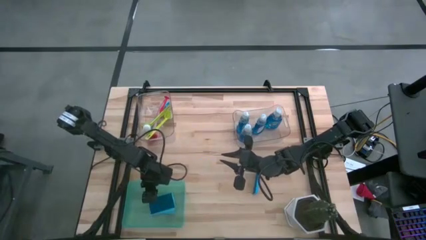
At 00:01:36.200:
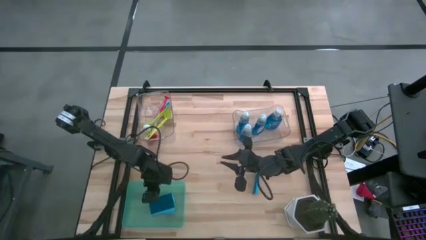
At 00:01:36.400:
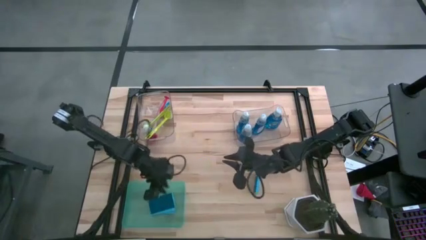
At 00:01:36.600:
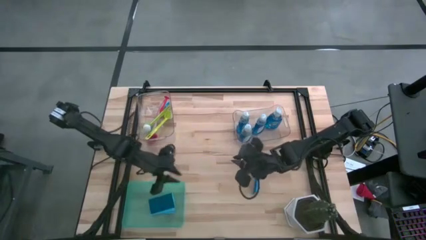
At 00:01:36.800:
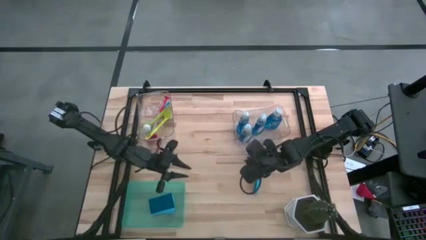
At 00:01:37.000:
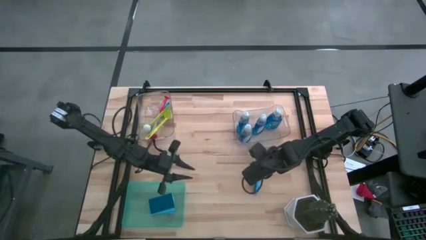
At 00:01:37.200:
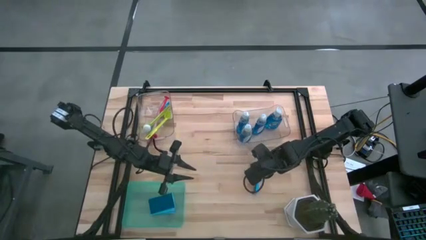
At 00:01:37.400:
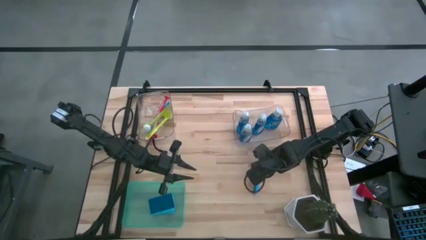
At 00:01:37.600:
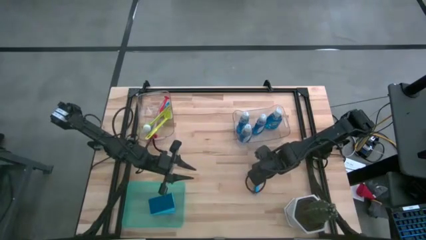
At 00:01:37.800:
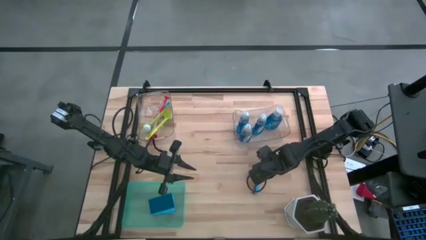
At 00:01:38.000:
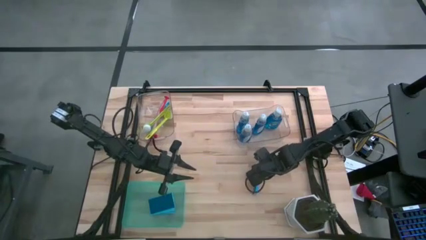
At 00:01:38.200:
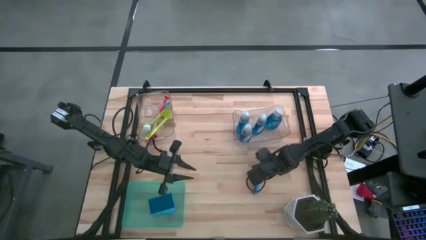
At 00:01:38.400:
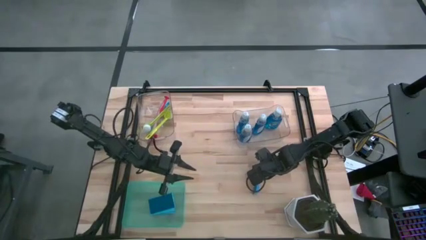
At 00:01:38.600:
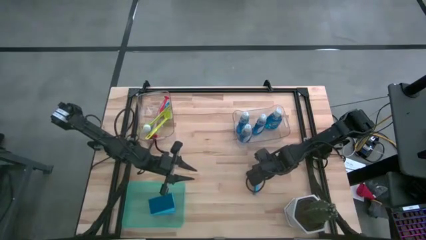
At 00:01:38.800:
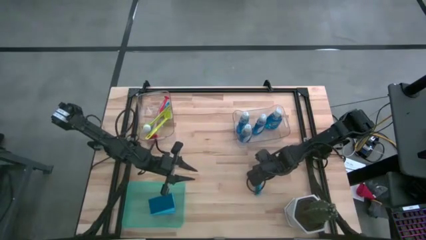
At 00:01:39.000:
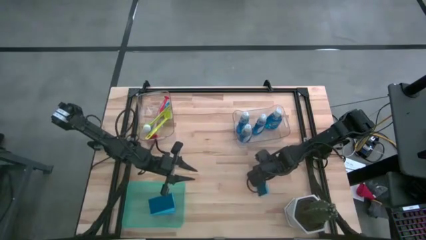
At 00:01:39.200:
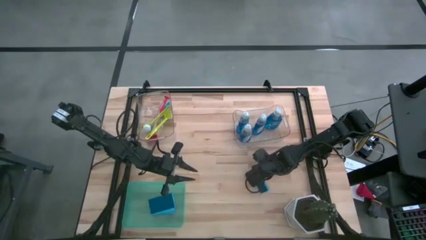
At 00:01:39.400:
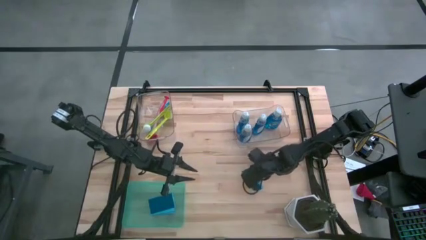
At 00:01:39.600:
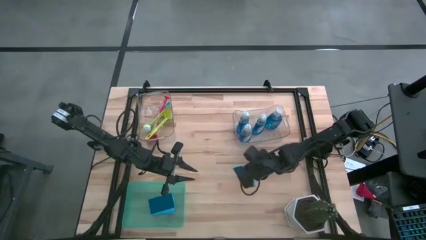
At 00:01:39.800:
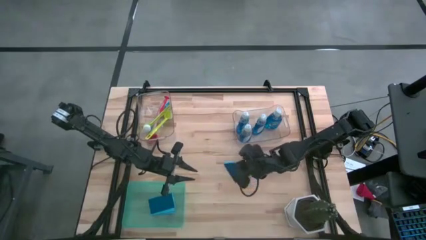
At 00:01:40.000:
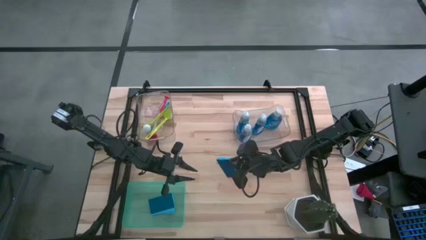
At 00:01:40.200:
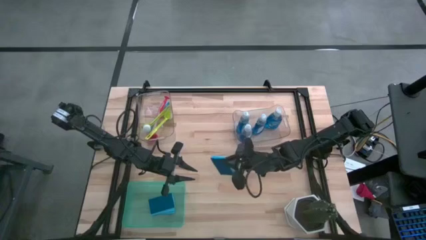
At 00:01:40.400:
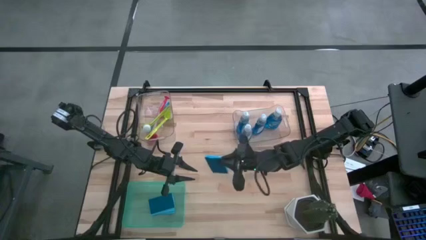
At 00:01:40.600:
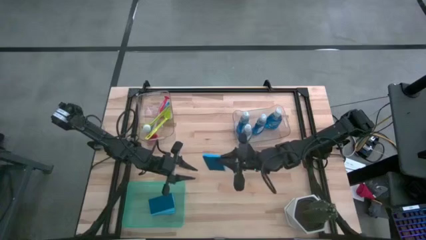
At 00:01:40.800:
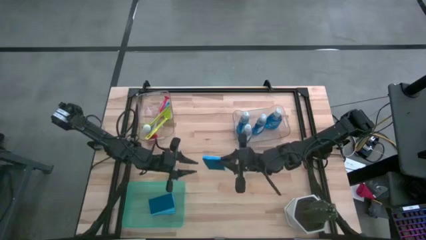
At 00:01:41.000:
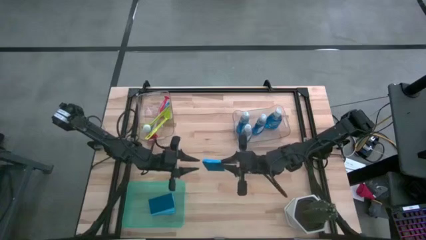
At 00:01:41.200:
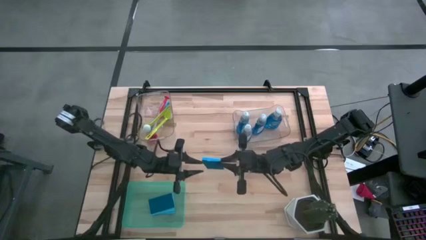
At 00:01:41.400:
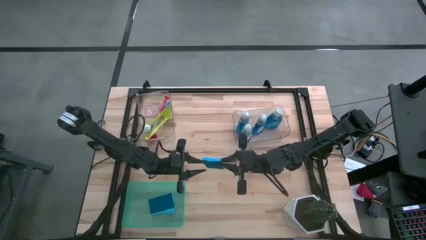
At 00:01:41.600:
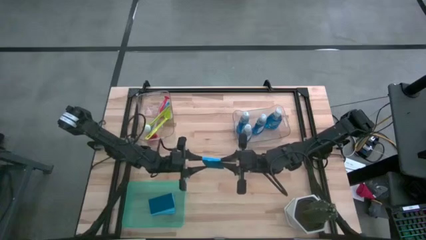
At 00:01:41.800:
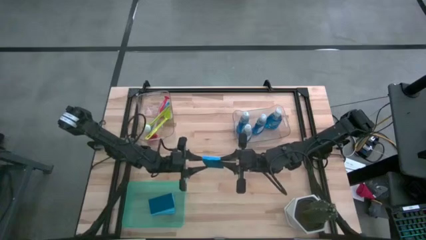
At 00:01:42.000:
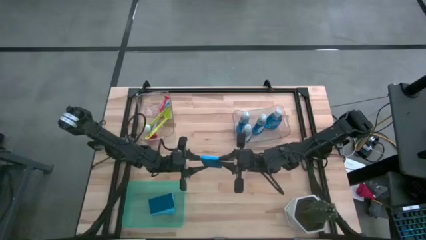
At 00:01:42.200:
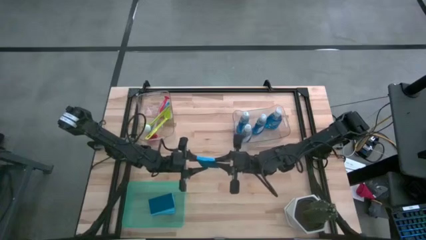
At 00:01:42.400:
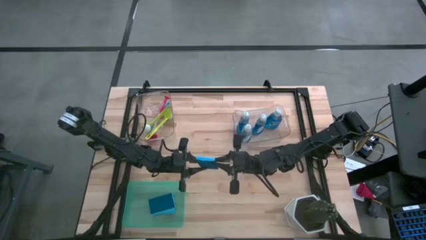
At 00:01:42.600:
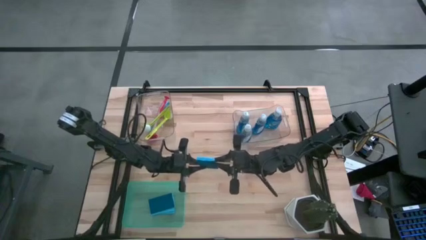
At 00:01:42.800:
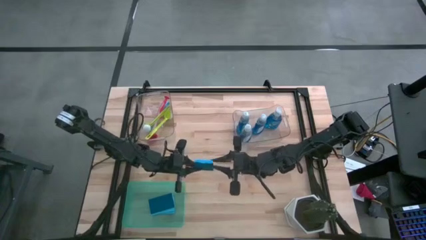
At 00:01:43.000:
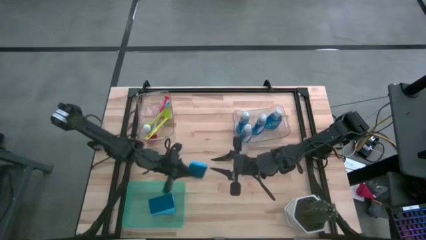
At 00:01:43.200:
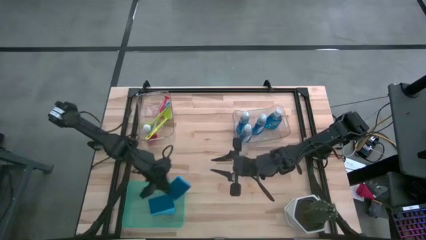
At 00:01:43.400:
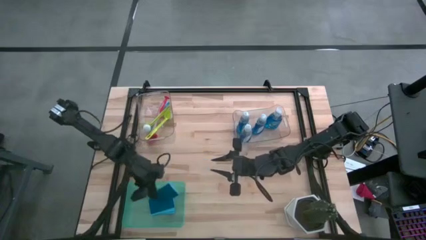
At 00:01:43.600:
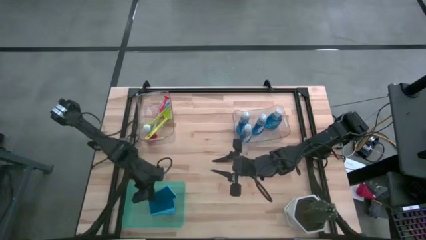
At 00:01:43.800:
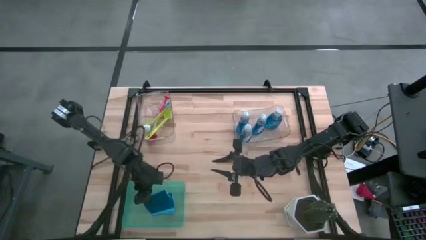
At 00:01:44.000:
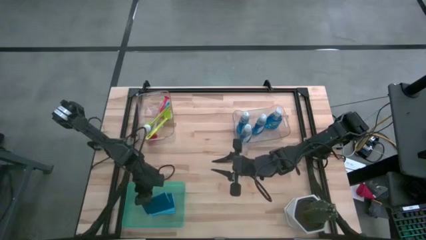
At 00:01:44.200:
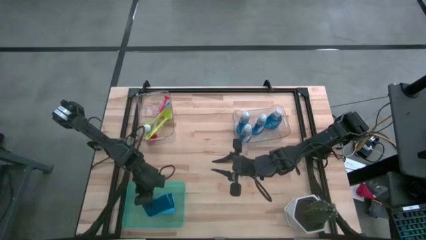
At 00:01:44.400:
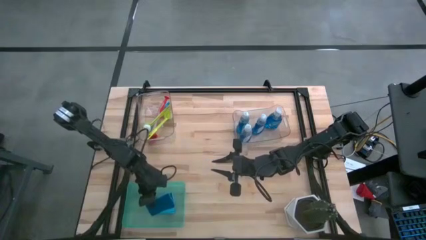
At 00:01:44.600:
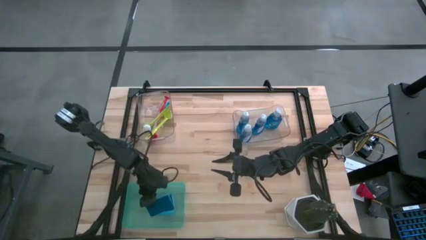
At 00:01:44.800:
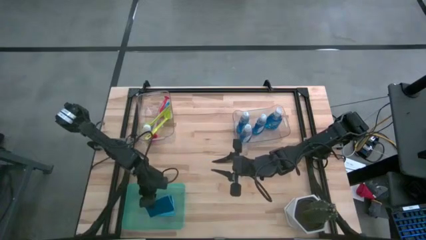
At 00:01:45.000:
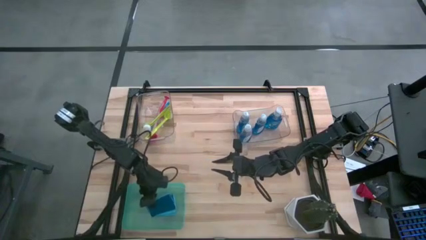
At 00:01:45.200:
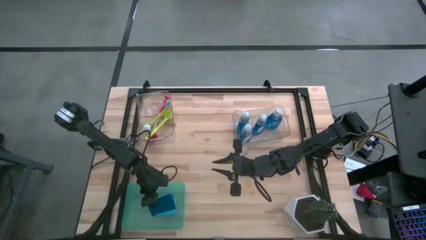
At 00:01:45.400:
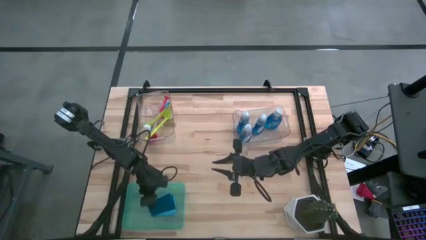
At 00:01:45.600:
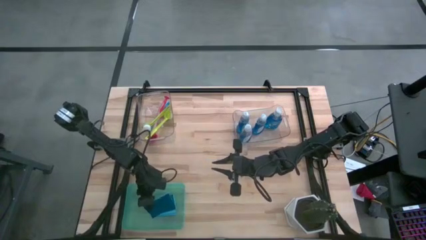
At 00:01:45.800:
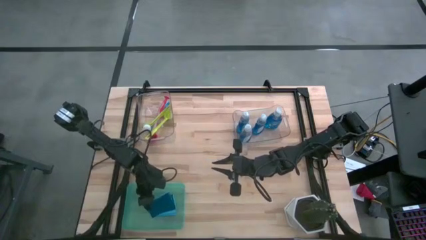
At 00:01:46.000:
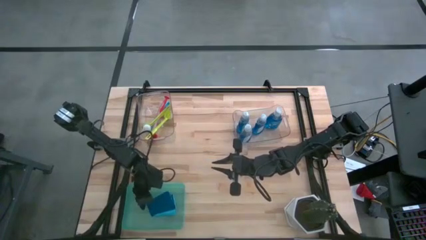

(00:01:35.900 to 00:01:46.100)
Task: Pick & Place Kitchen Sink Supplies
Stack the blue sponge on top of the blue sponge in the green bin

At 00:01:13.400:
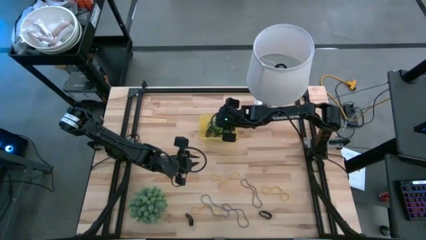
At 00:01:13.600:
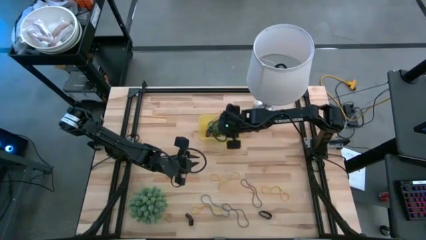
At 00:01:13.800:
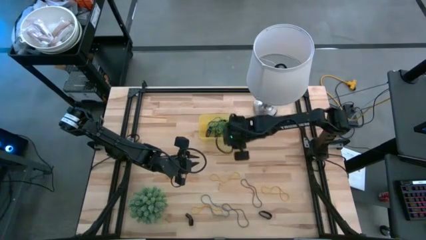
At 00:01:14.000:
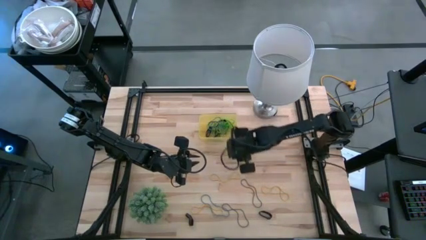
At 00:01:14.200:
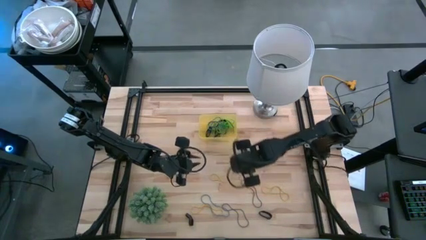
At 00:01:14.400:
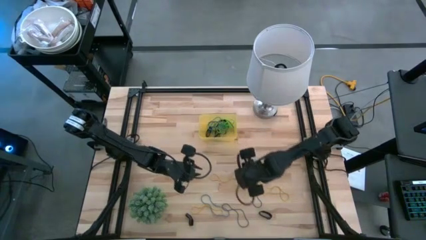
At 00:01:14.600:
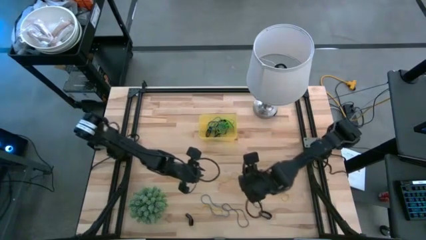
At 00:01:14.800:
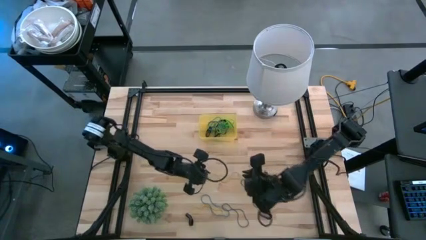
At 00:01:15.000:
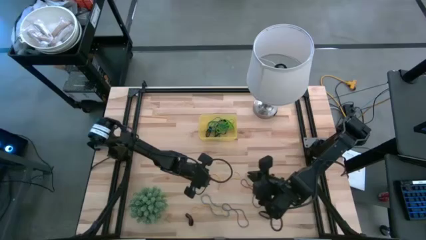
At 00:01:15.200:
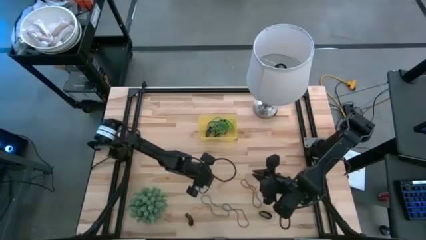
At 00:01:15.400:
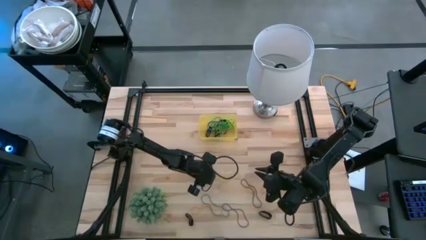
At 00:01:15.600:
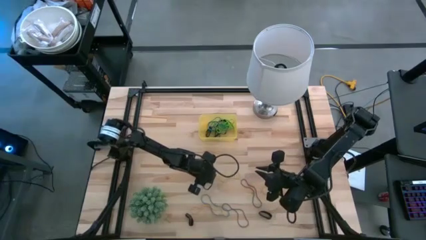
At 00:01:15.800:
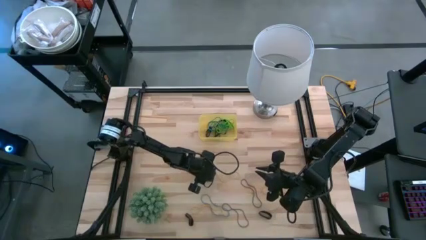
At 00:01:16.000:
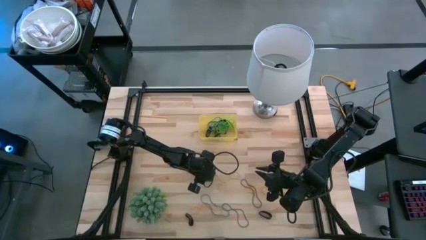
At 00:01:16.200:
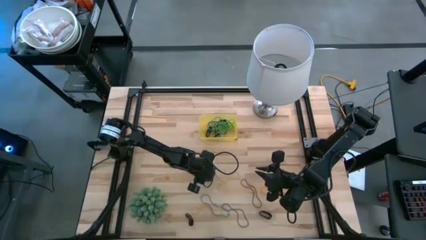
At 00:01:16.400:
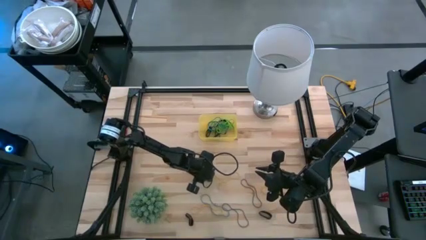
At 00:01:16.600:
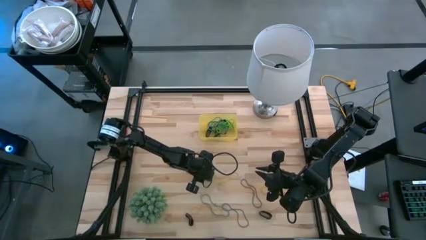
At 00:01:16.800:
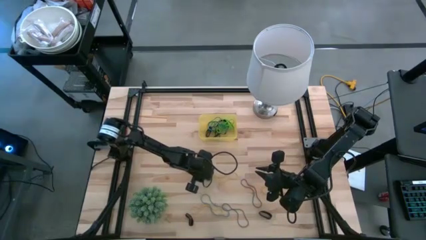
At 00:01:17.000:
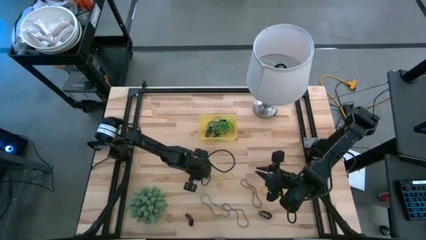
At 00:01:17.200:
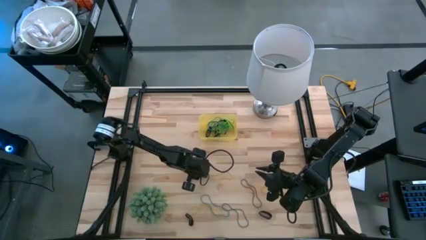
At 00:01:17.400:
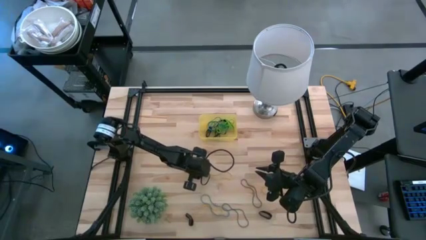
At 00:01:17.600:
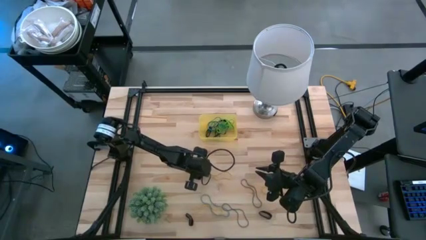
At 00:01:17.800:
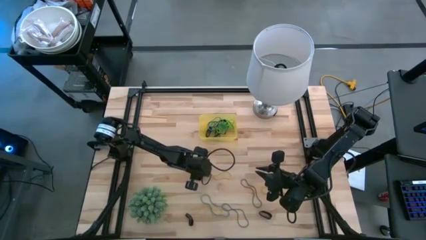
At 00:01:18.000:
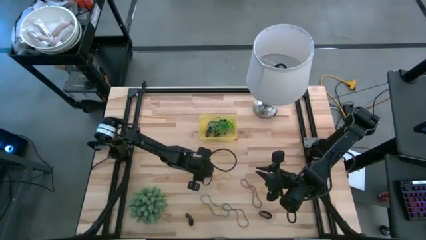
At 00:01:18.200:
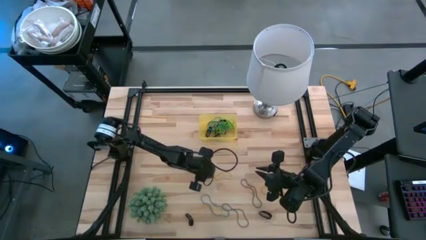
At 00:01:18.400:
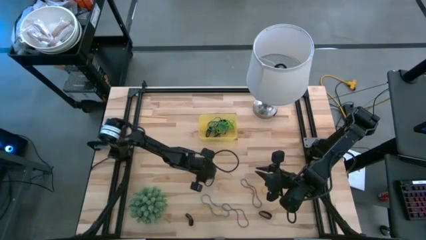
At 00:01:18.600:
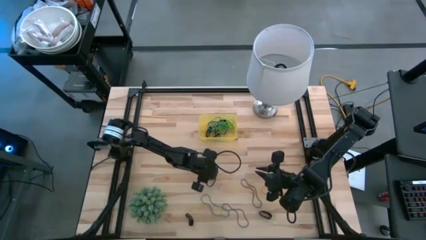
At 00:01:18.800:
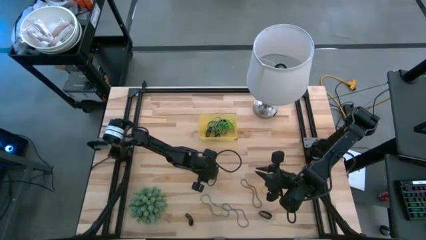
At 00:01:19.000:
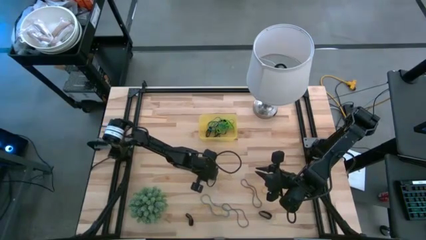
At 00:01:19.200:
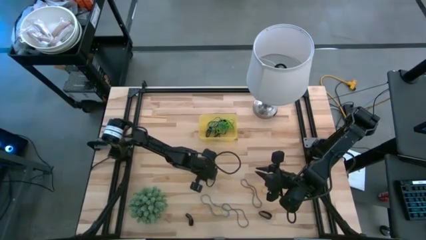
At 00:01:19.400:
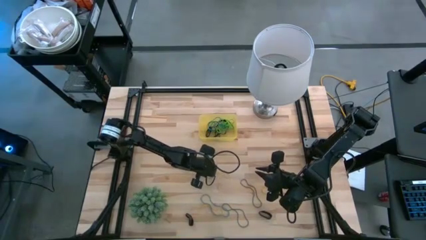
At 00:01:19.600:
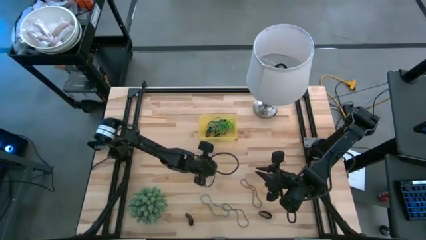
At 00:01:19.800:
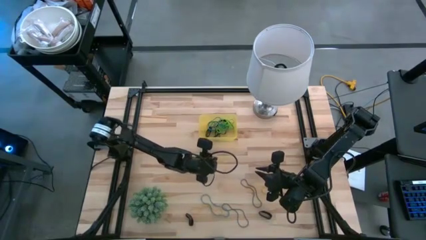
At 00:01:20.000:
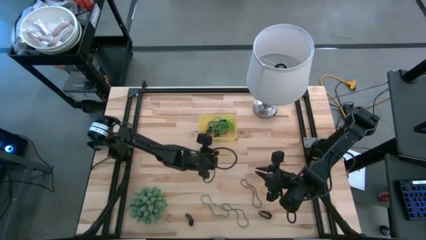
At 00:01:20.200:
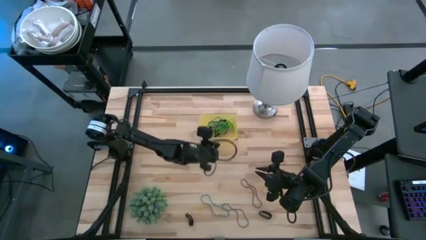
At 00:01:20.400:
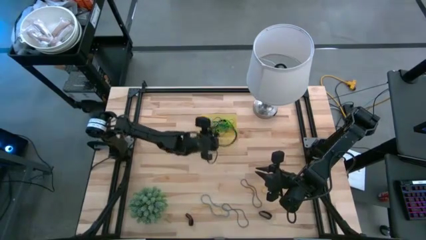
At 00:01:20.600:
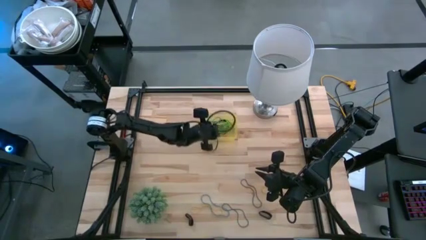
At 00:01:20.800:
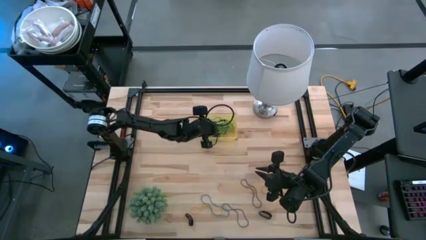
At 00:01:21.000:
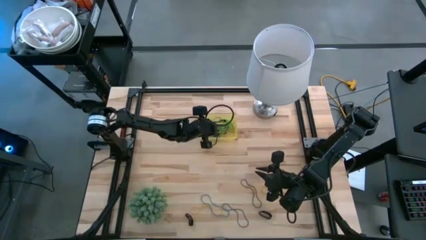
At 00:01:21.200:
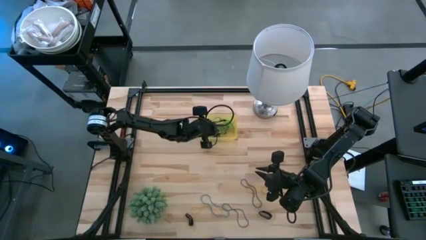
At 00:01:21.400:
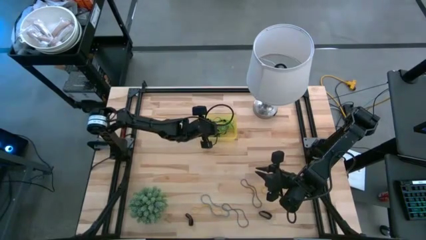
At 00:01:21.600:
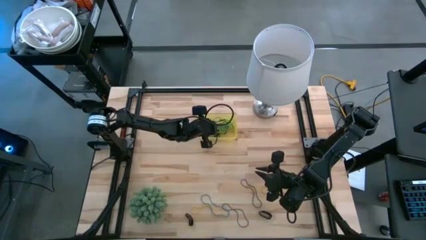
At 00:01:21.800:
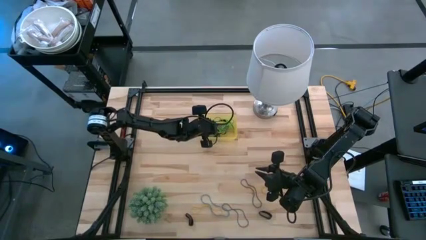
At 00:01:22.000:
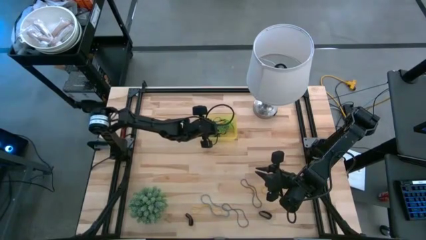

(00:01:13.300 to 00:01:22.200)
Task: Pick and place rubber bands into bin
Put the yellow rubber band into the yellow bin
